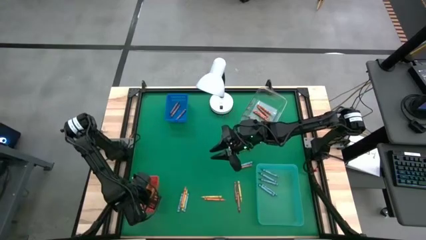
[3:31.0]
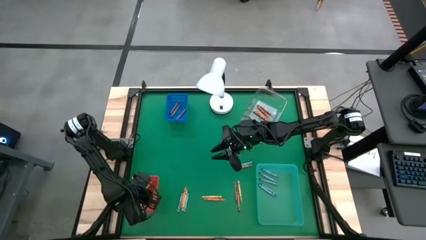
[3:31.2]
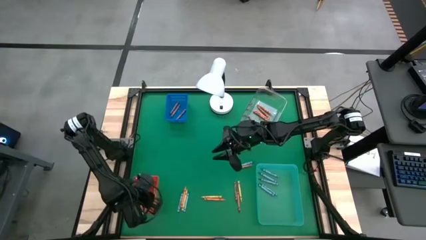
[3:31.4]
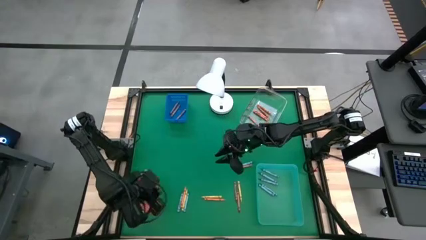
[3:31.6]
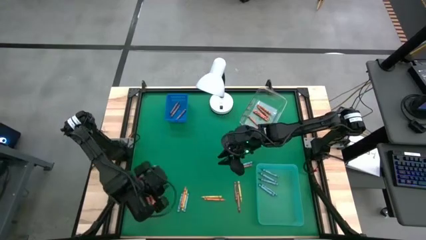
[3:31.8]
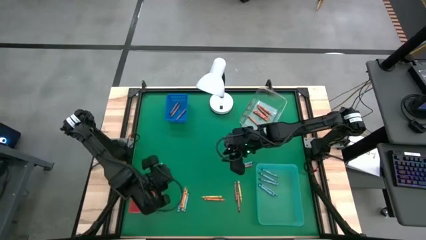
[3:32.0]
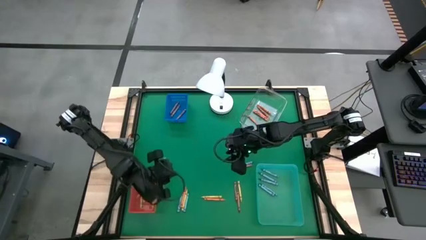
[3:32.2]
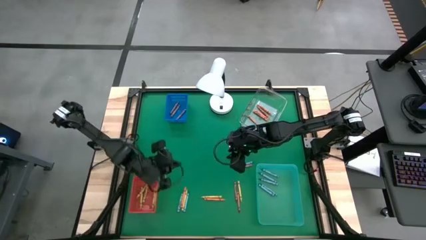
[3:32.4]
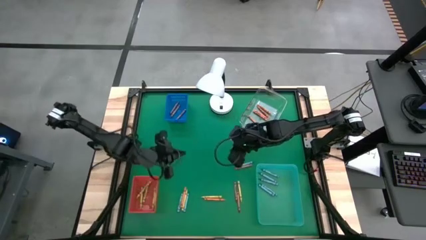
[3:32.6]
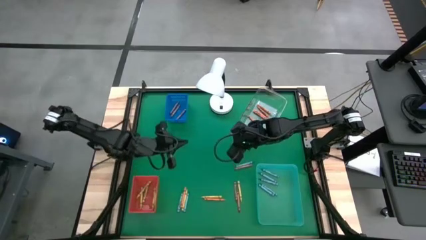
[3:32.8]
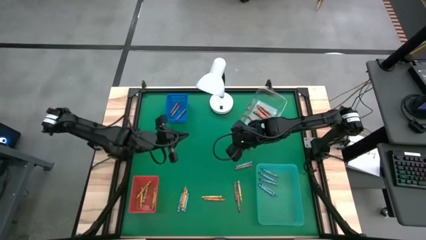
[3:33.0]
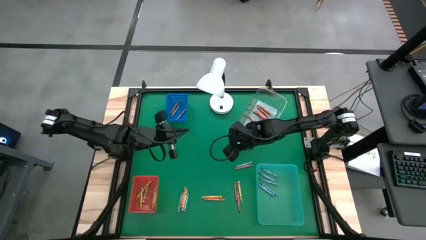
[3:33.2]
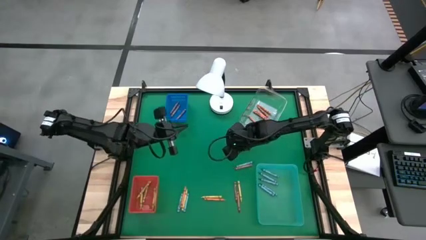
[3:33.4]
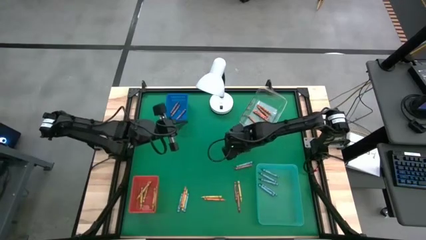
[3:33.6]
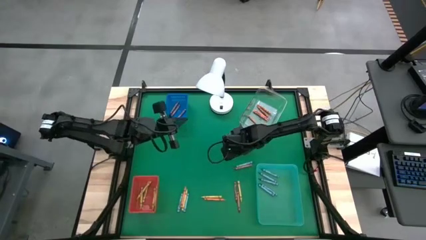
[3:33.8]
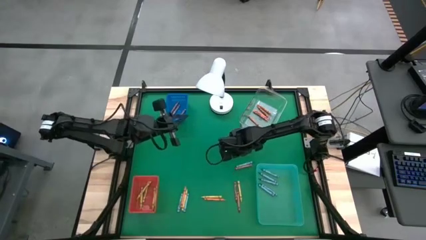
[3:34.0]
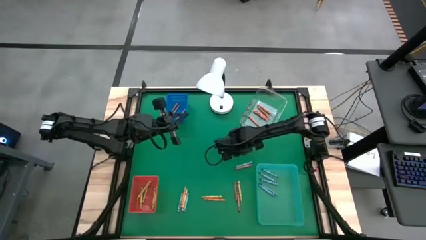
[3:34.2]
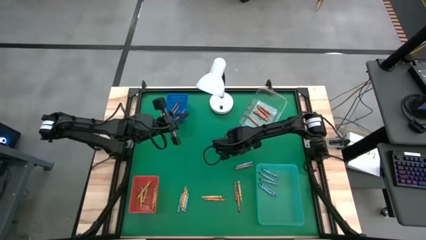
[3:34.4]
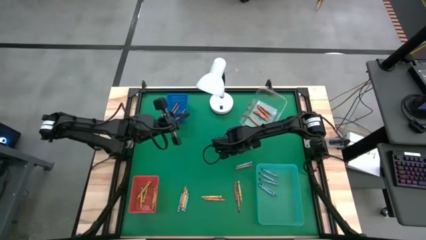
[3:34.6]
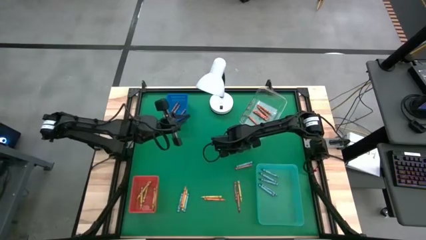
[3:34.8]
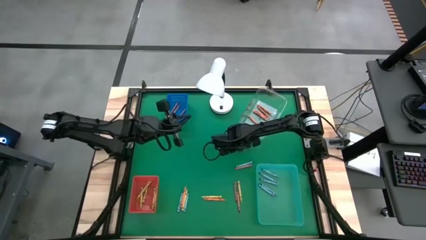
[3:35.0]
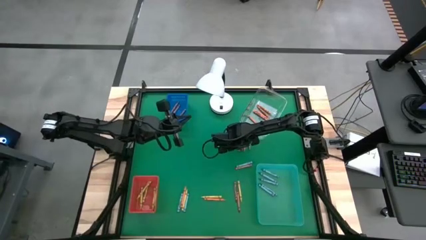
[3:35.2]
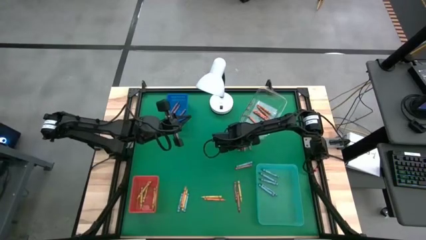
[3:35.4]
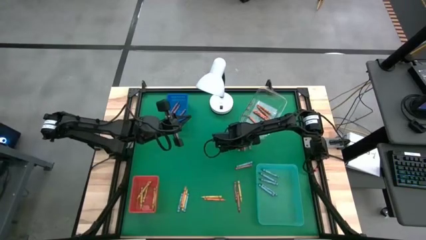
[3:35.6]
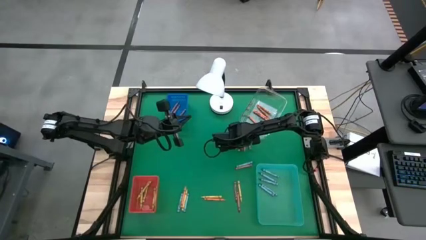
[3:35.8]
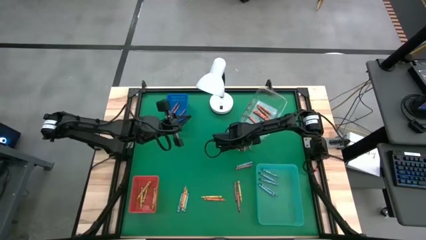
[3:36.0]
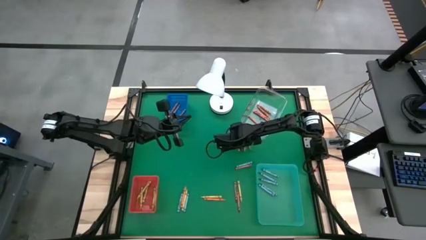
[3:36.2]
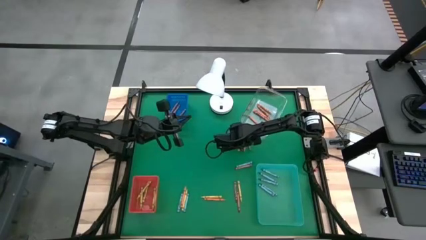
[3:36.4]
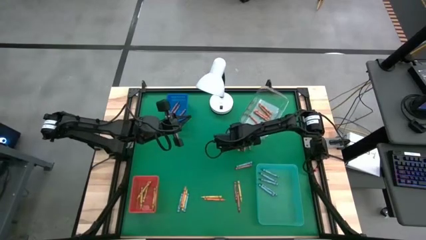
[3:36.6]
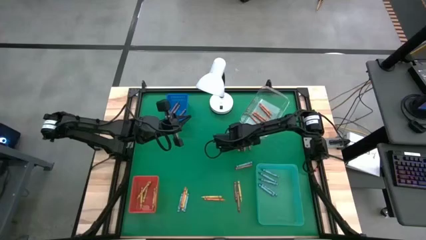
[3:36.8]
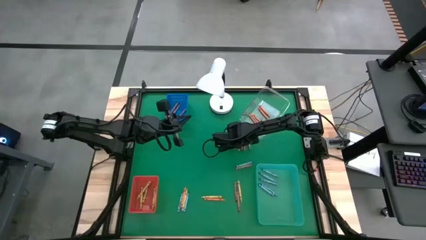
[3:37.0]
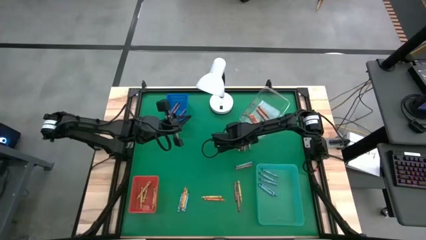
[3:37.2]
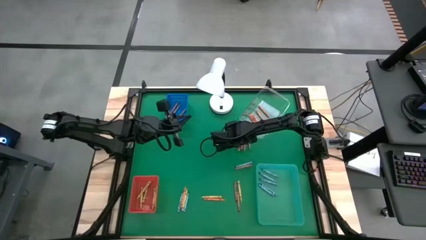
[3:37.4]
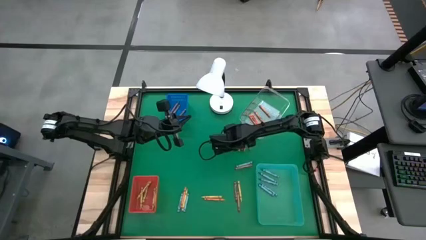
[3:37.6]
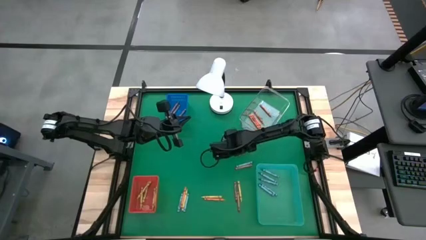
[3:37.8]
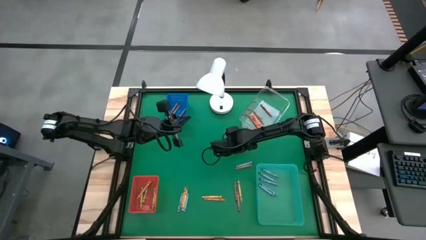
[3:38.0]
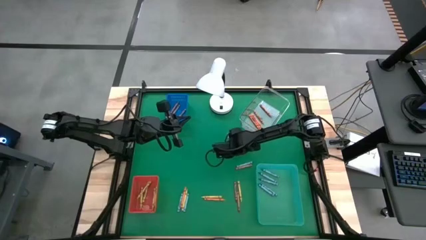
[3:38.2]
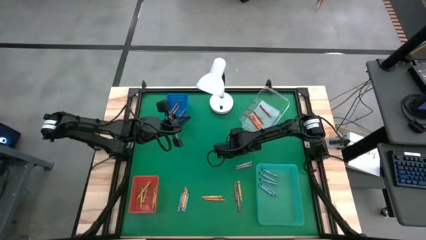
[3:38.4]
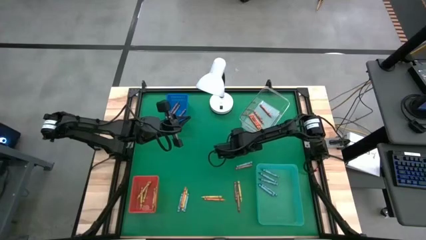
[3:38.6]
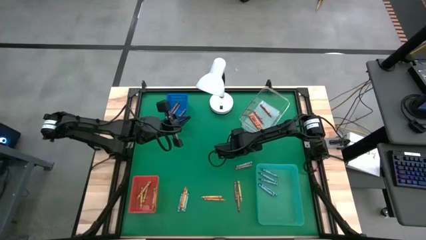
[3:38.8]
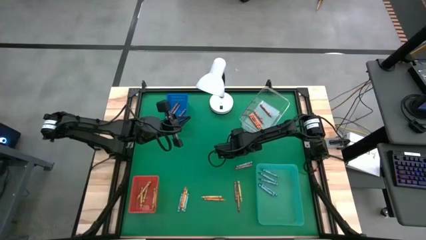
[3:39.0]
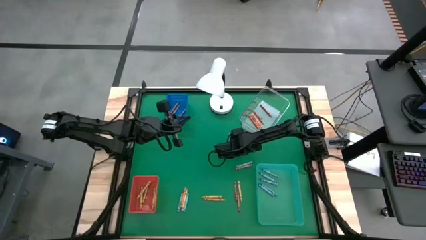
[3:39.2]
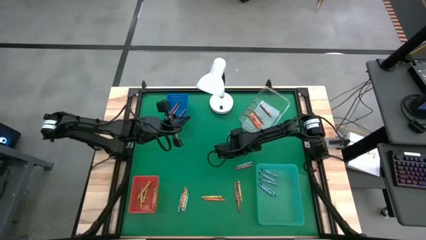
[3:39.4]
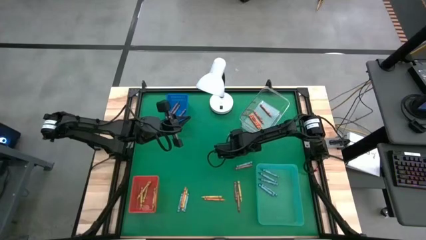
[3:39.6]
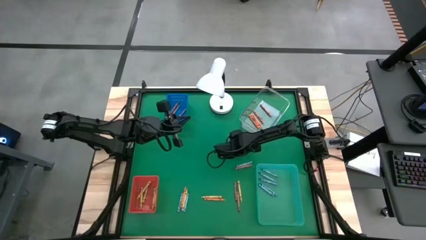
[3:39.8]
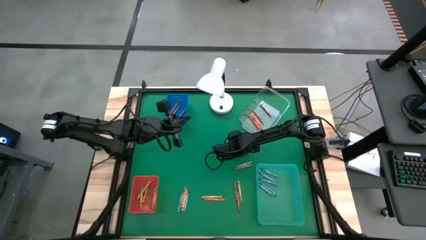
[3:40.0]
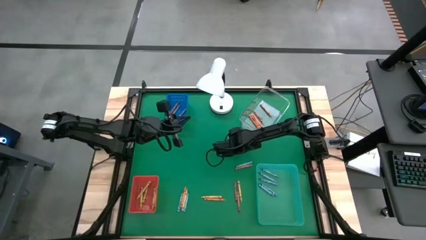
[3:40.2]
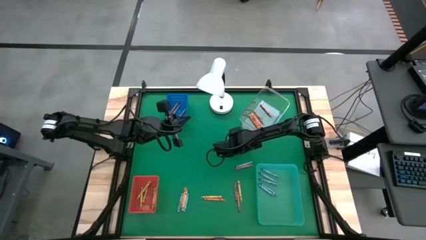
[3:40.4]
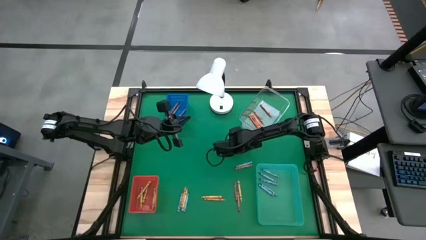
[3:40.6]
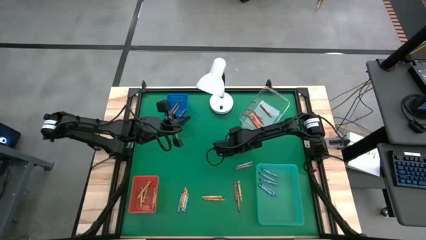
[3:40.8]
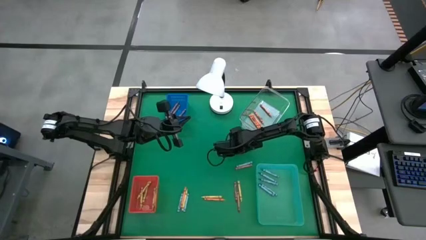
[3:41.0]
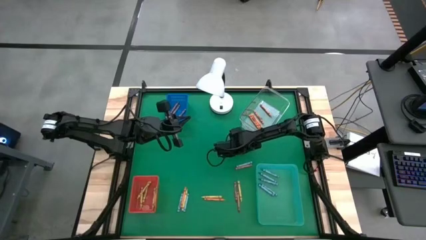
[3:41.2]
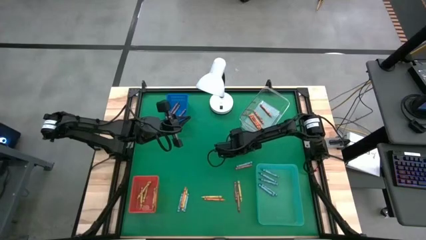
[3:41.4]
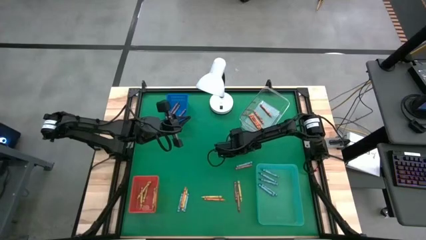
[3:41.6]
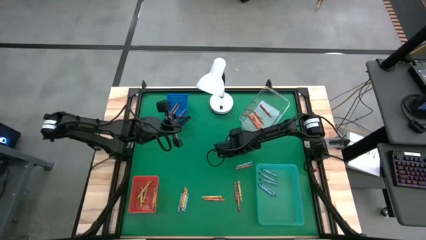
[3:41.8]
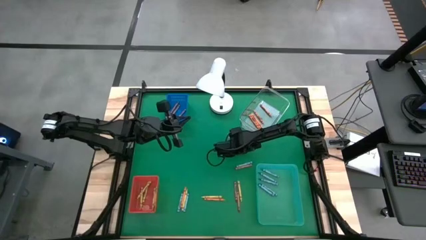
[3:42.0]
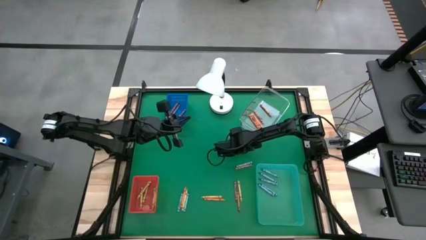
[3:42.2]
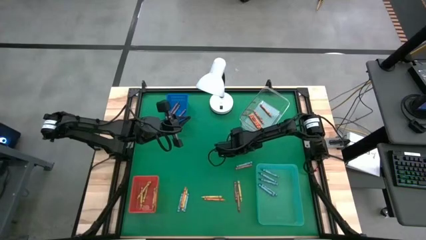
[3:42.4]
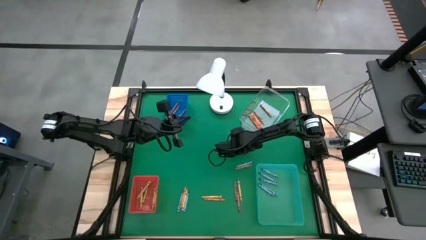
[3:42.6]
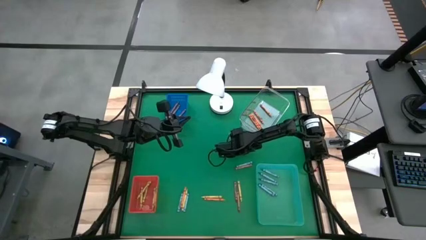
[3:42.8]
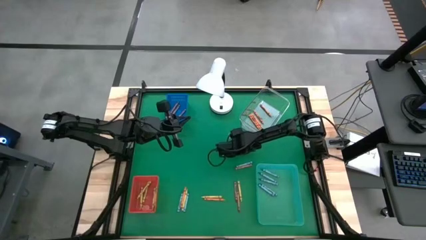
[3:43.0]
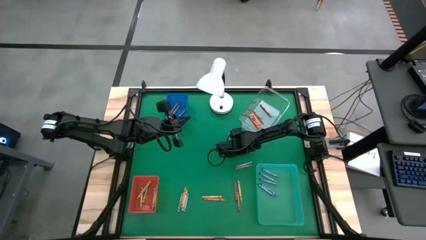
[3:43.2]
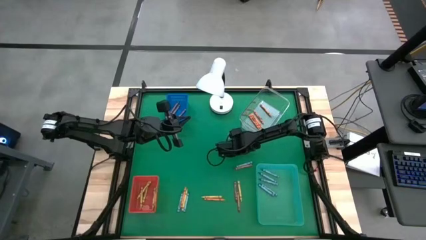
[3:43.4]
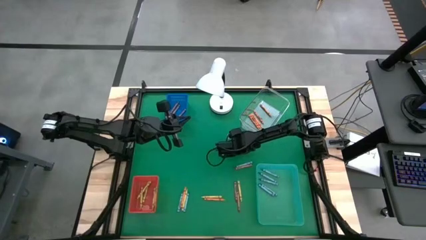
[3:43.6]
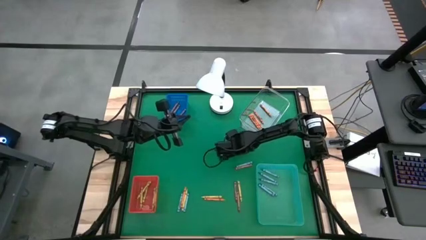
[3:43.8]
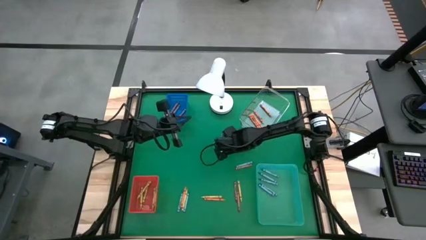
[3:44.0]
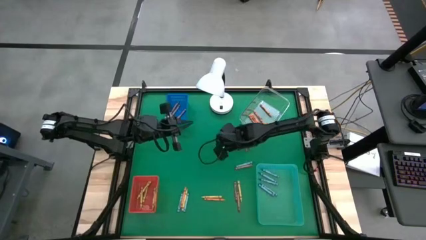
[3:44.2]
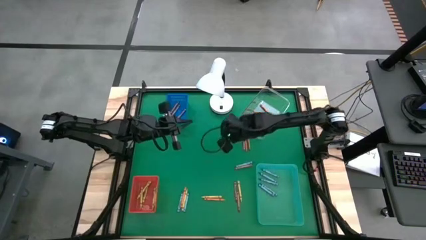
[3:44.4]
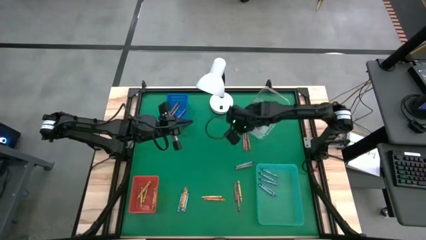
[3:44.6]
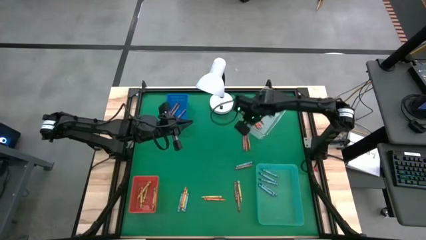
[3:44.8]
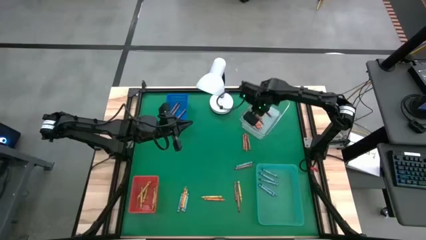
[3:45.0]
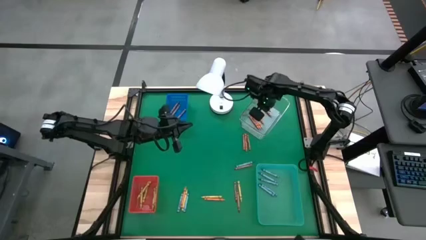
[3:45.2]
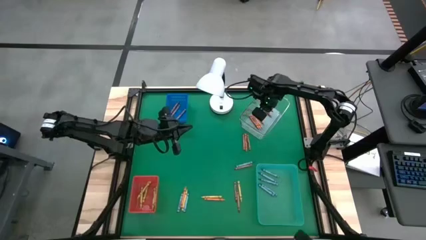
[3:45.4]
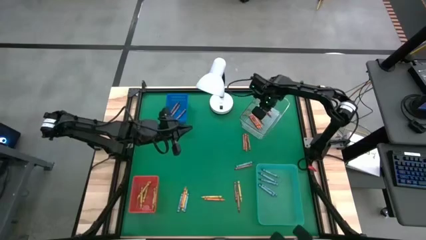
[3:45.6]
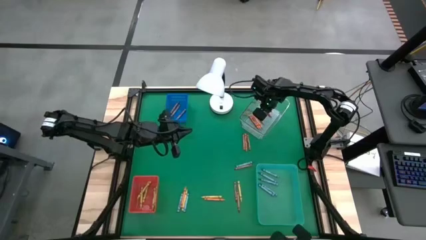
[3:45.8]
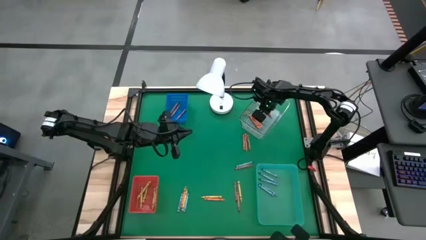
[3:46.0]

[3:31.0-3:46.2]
Task: Sort crayons
Put the orange crayon into the transparent bin
